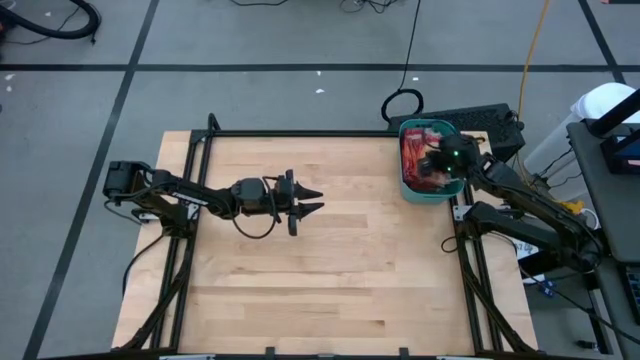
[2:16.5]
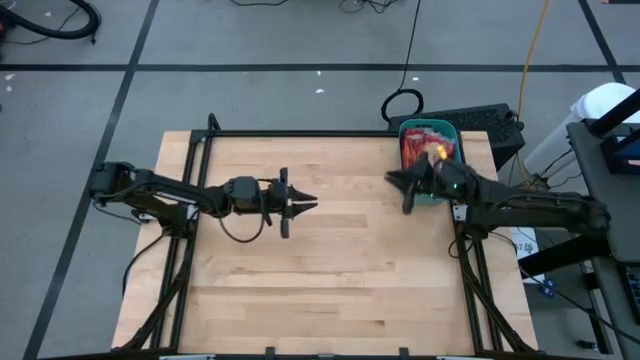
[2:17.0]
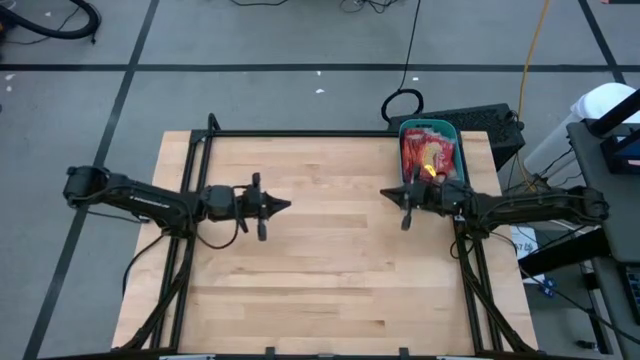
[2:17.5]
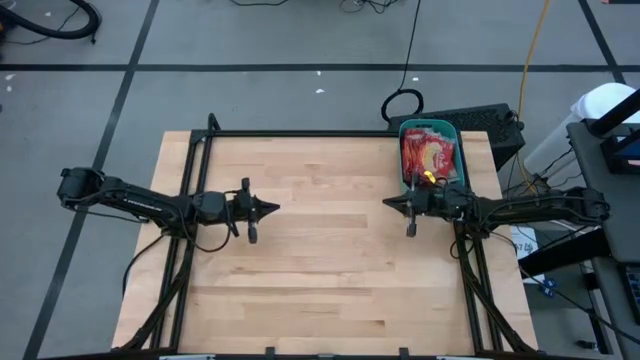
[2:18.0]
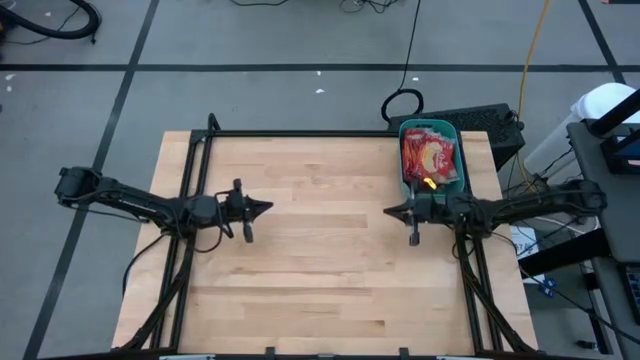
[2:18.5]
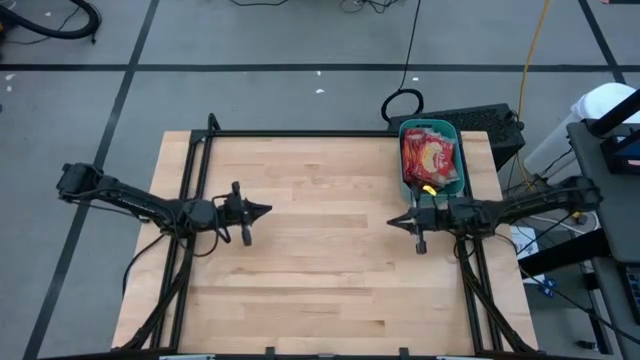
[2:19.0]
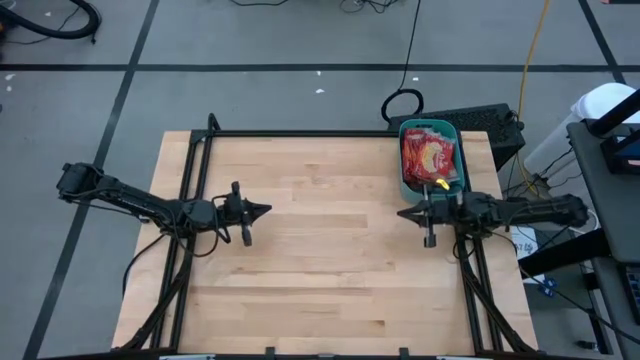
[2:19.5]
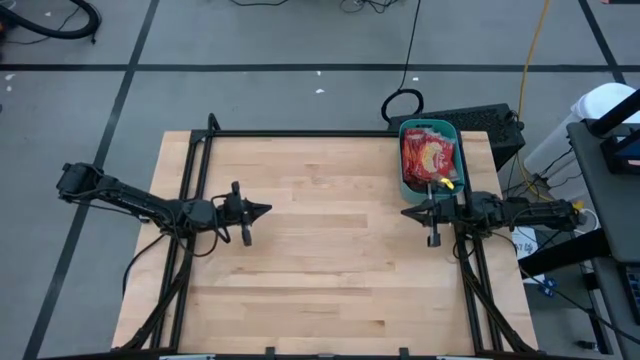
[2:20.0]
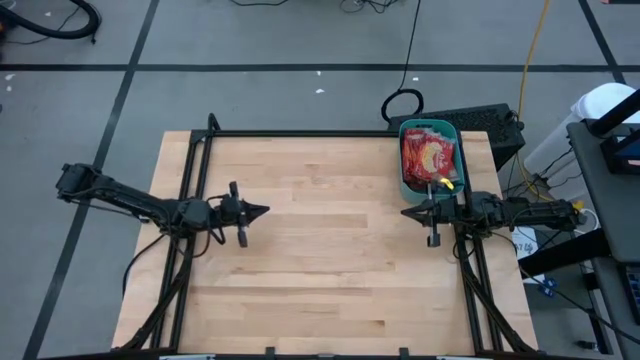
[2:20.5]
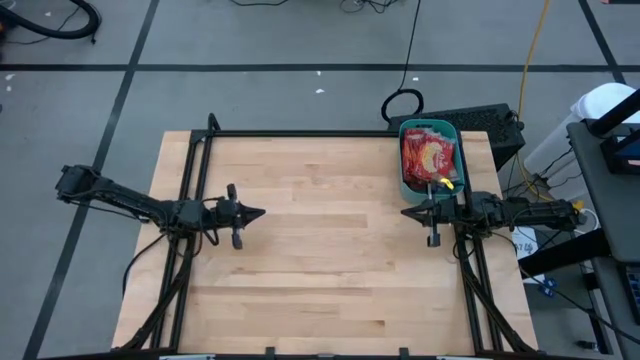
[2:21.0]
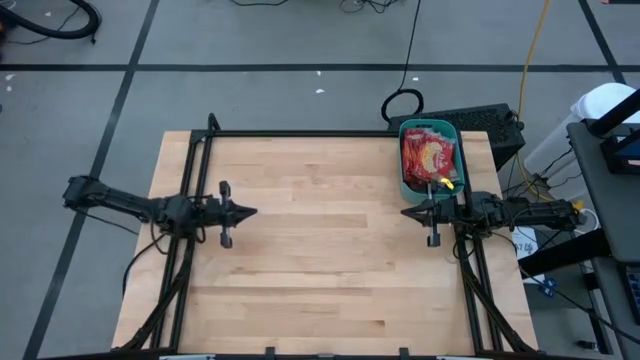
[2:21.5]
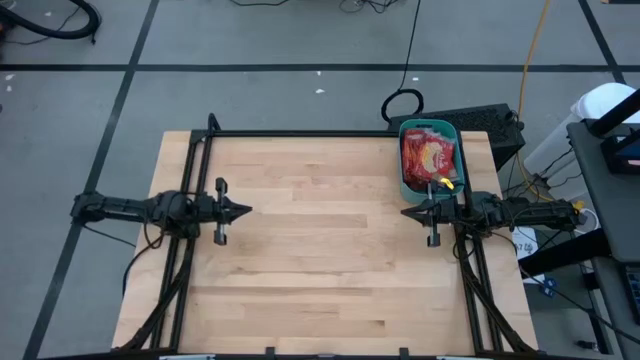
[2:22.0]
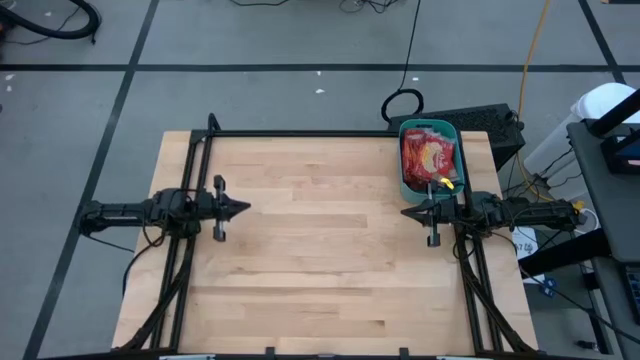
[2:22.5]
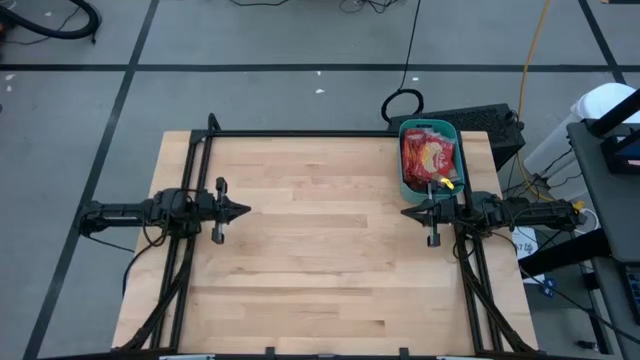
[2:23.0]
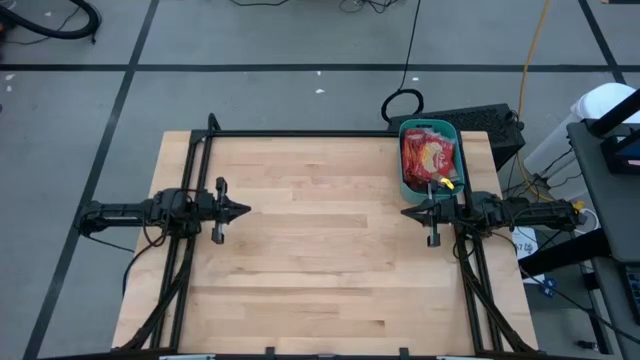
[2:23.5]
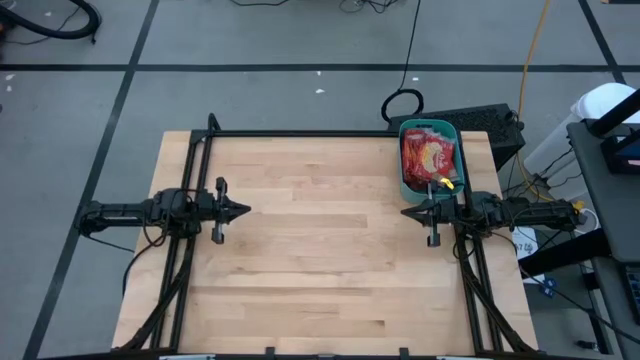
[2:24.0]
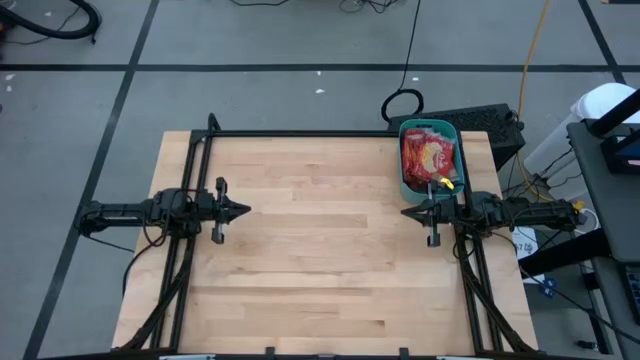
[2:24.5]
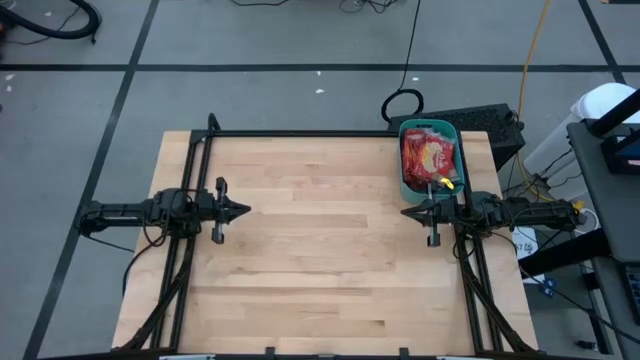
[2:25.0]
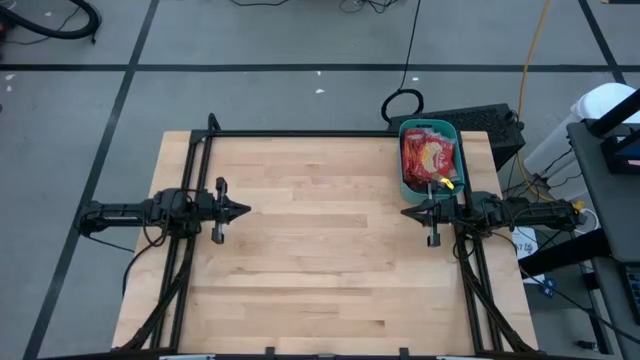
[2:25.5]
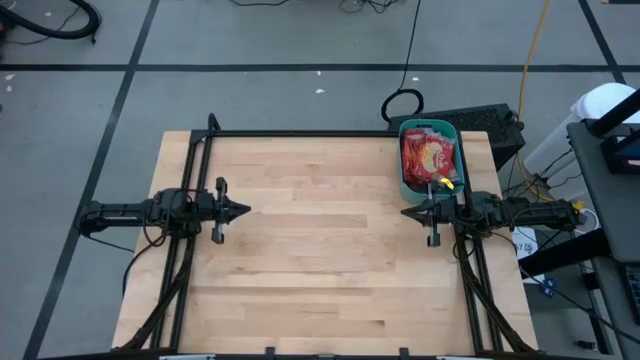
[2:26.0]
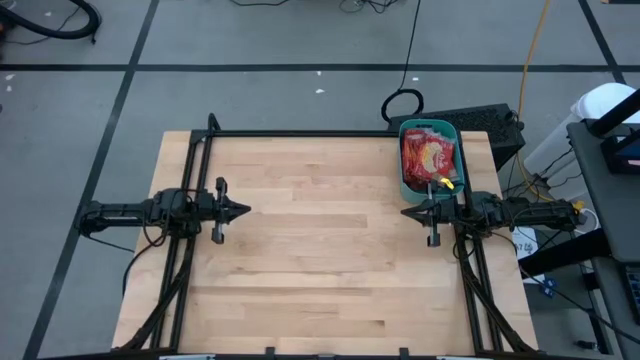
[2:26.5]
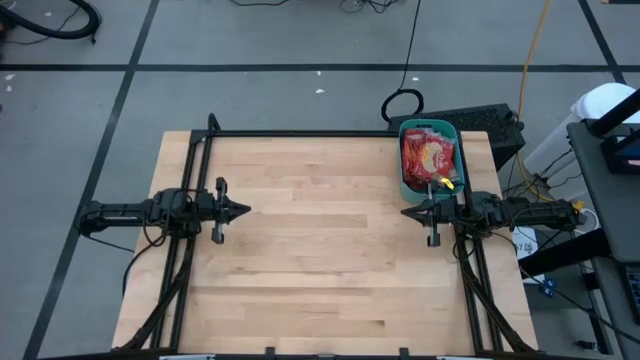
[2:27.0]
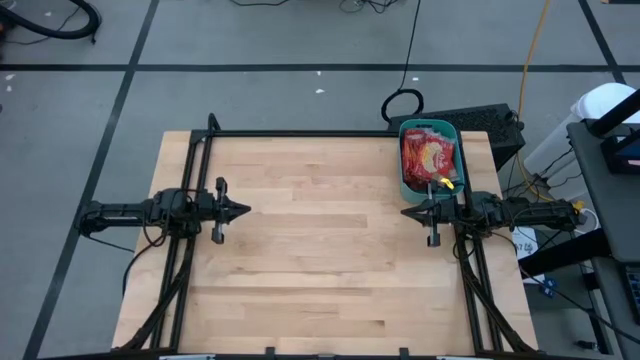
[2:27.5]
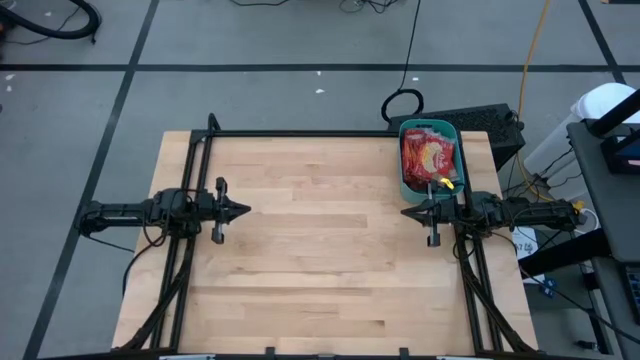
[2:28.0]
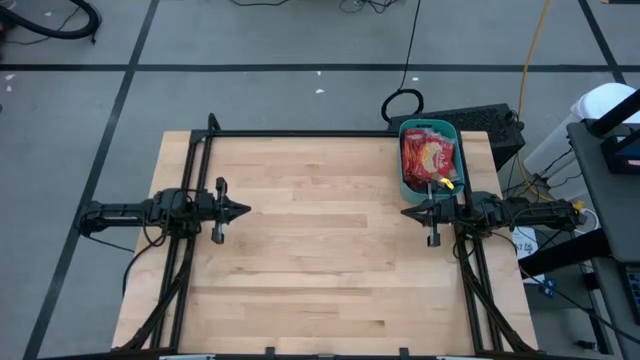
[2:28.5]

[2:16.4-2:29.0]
Task: Sort popcorn bags into baskets
Return to Home Position

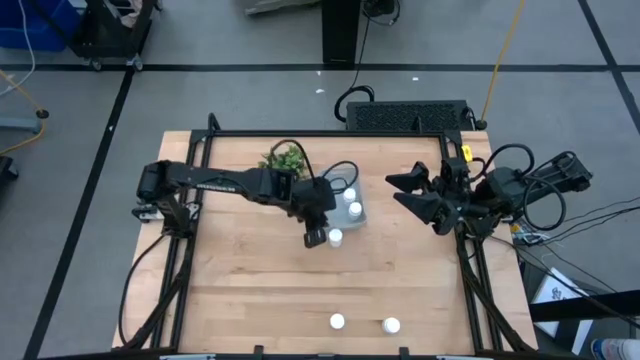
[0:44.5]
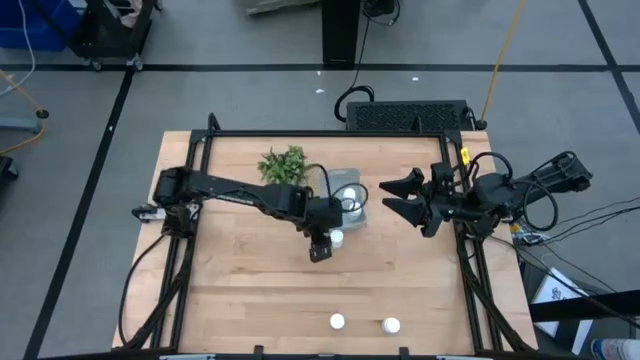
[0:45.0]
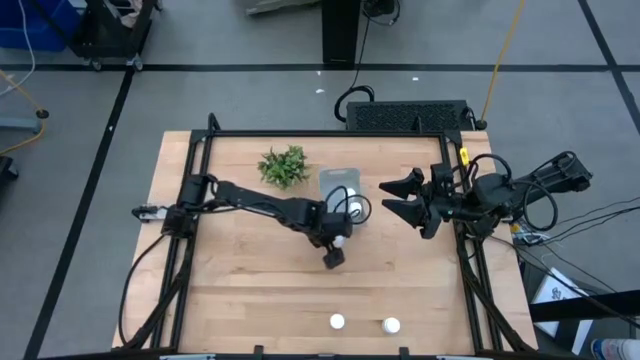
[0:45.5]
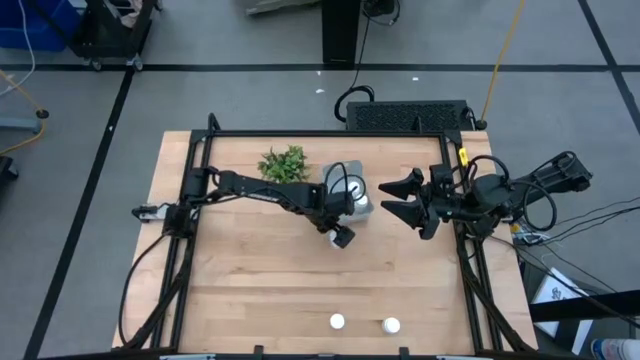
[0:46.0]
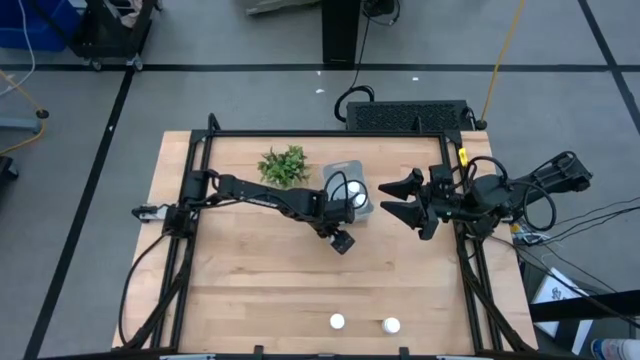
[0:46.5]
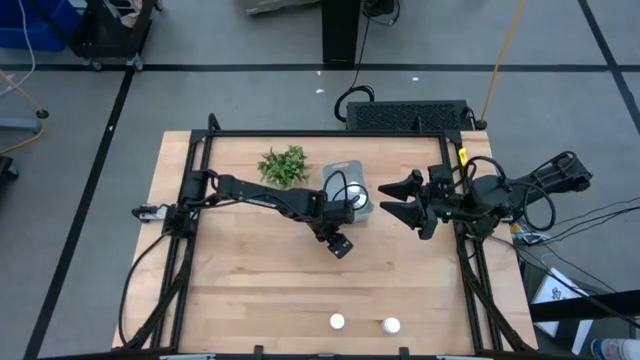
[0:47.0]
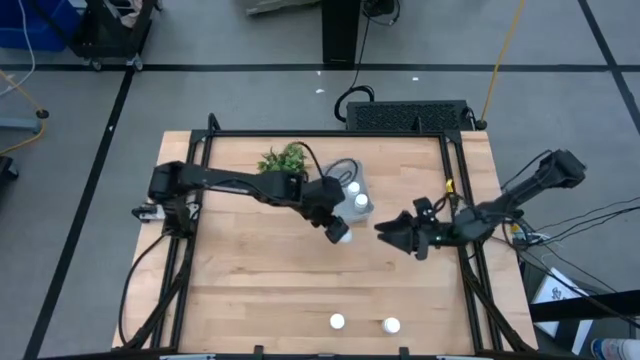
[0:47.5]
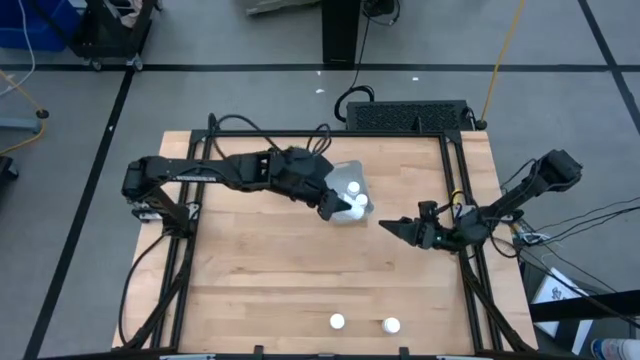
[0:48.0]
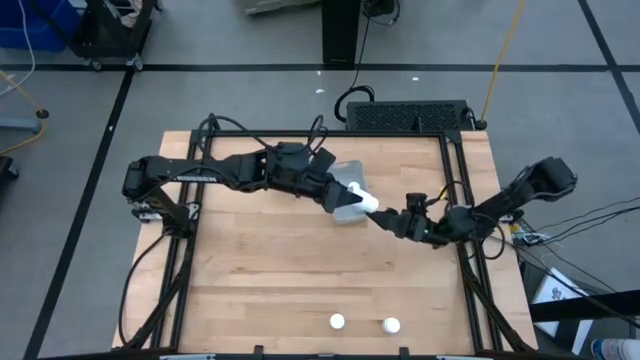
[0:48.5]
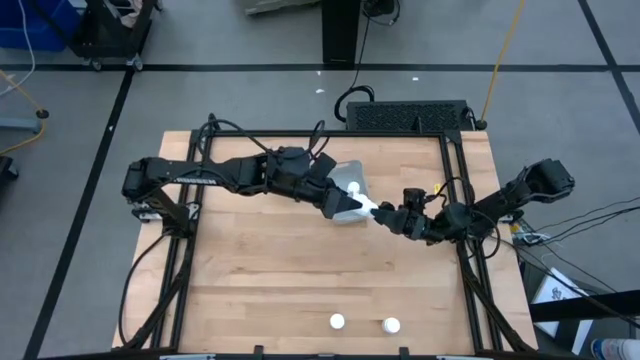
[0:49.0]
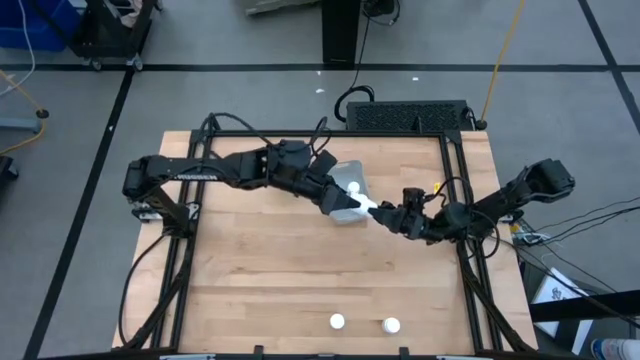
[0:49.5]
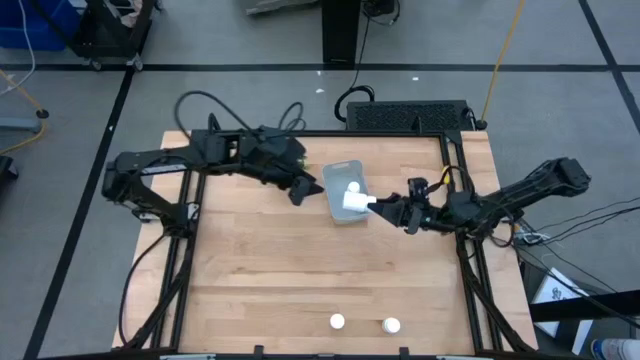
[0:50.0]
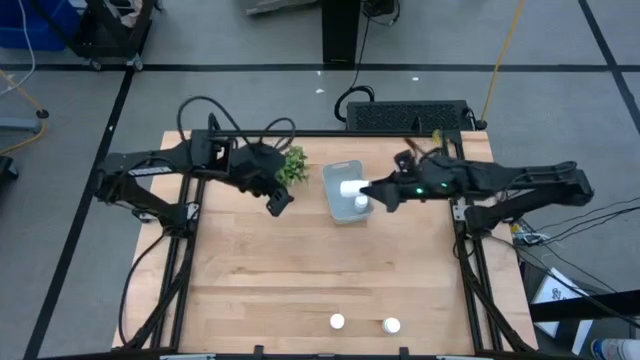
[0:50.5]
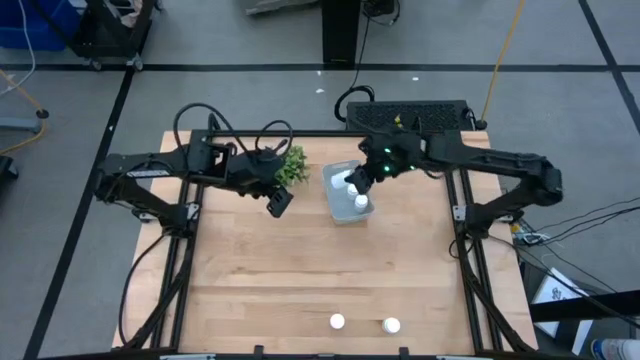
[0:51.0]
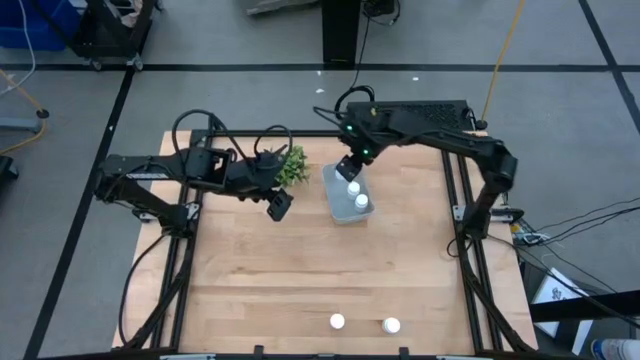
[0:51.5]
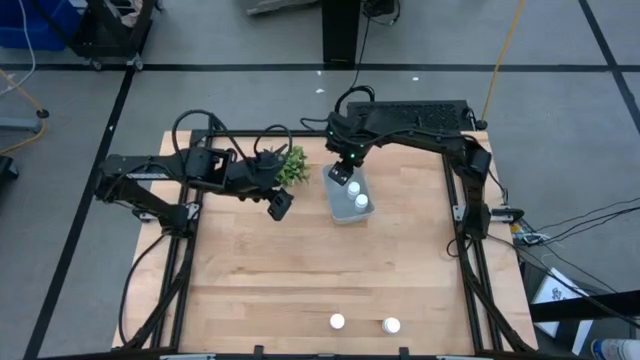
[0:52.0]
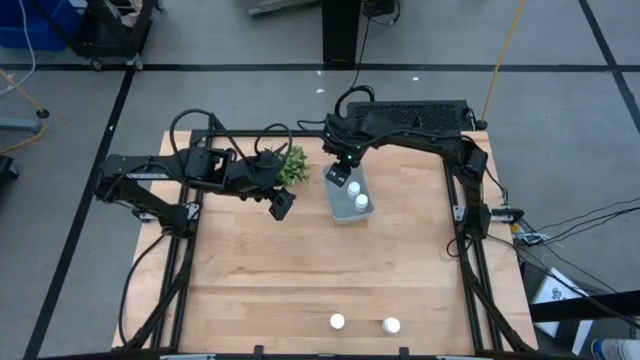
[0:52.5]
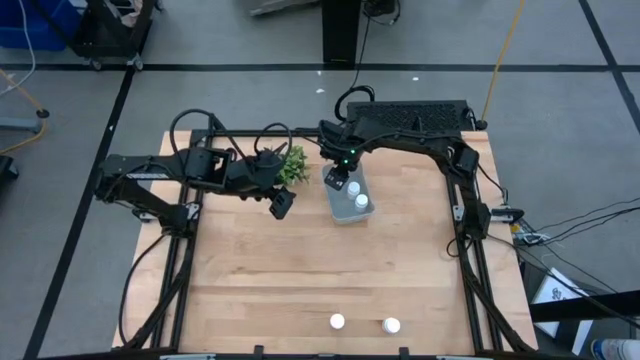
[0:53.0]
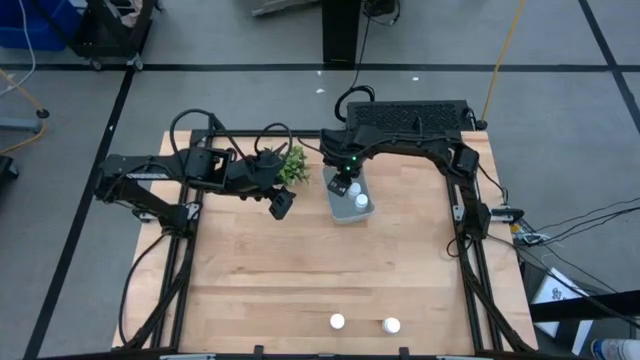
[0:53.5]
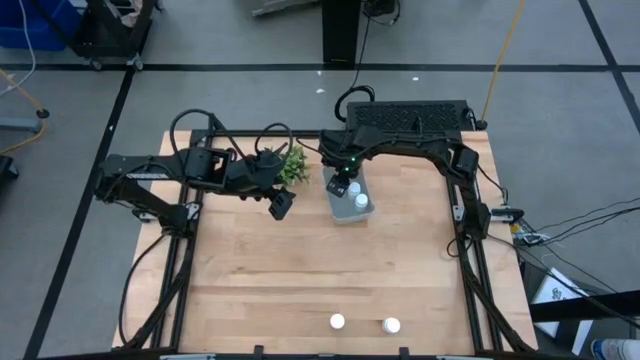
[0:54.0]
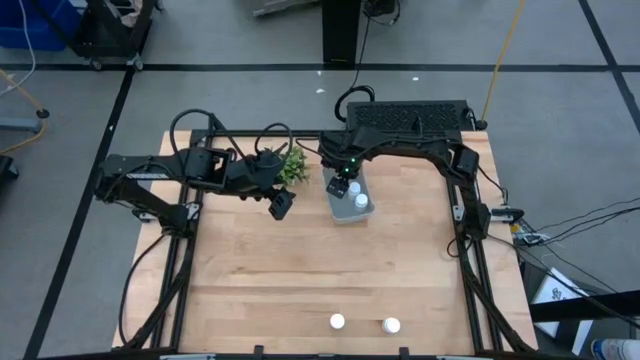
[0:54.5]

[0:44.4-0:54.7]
Task: Pick and place pill bottles into a basket
Put the white pill bottle into the gray bin
